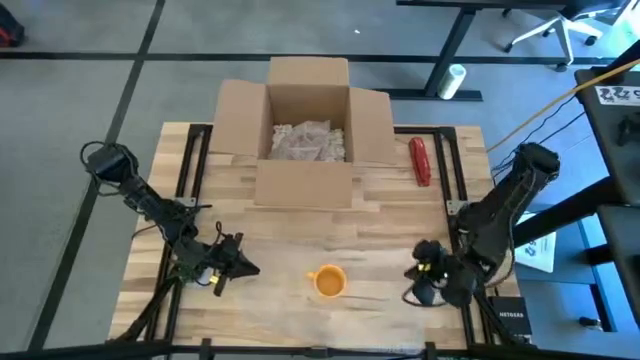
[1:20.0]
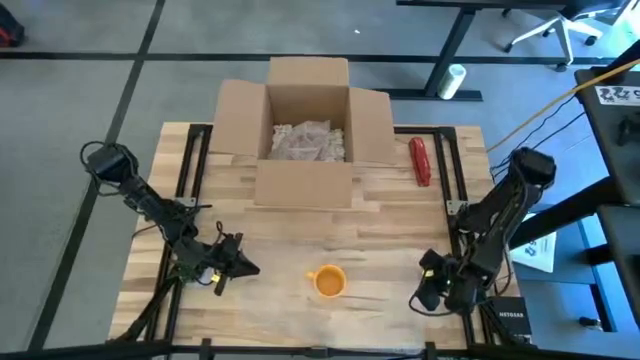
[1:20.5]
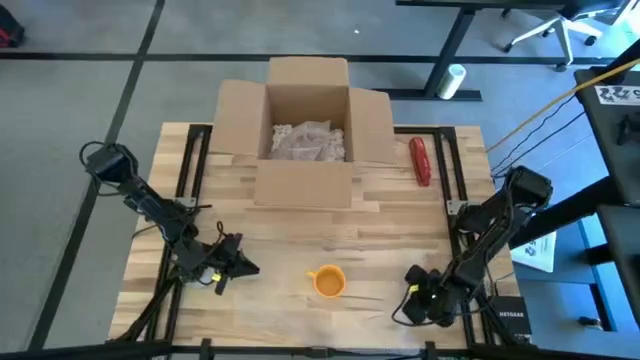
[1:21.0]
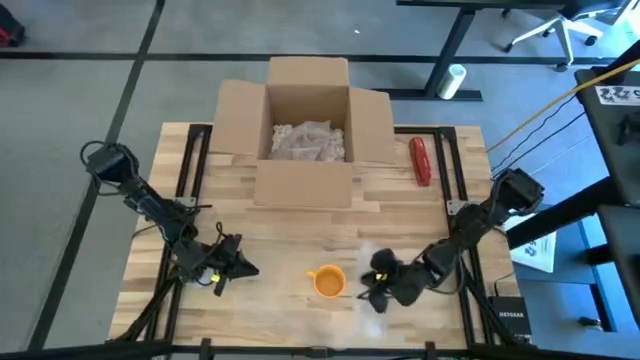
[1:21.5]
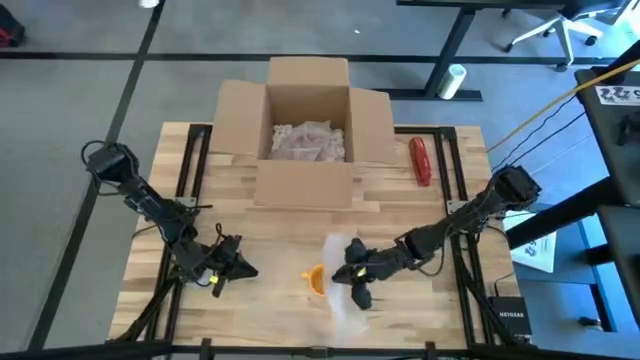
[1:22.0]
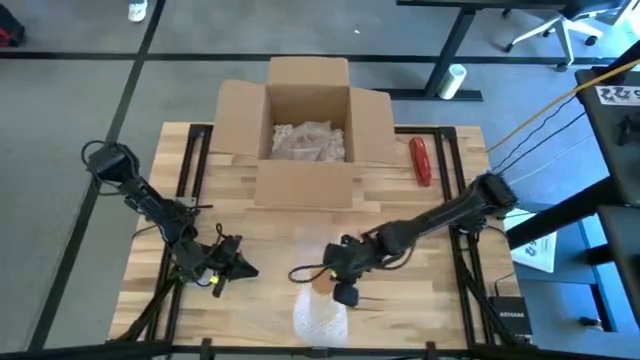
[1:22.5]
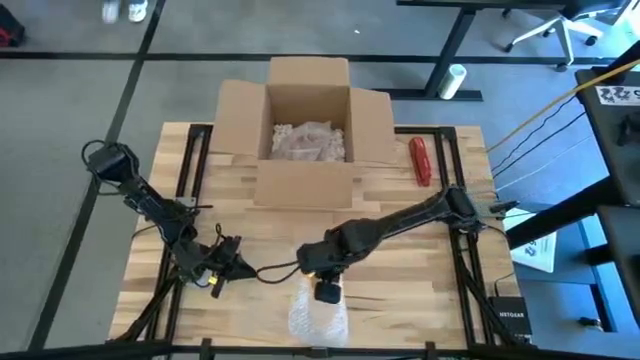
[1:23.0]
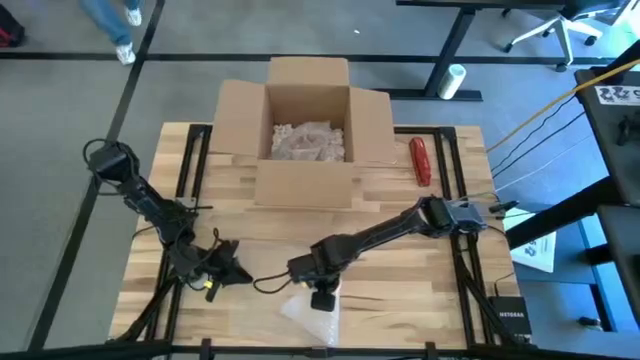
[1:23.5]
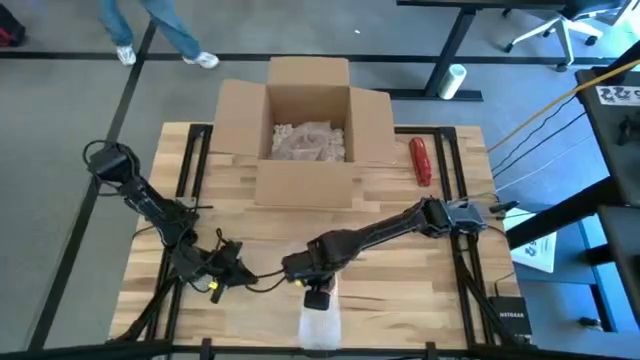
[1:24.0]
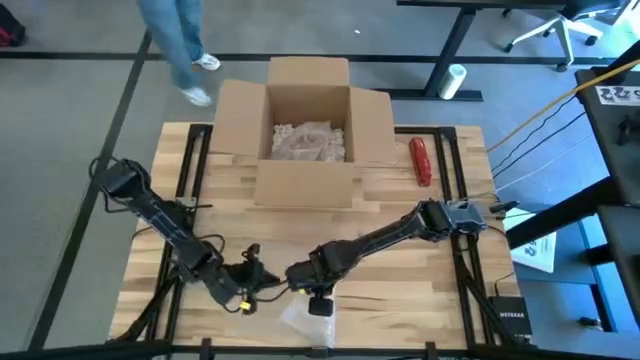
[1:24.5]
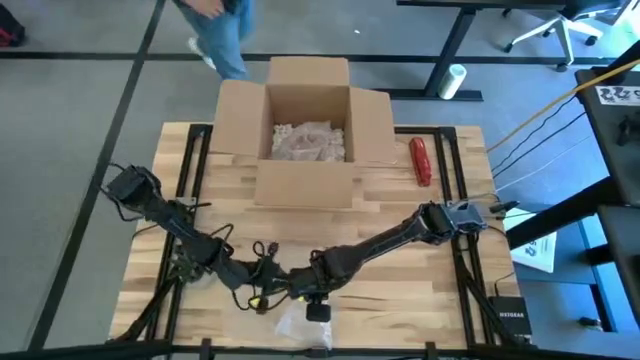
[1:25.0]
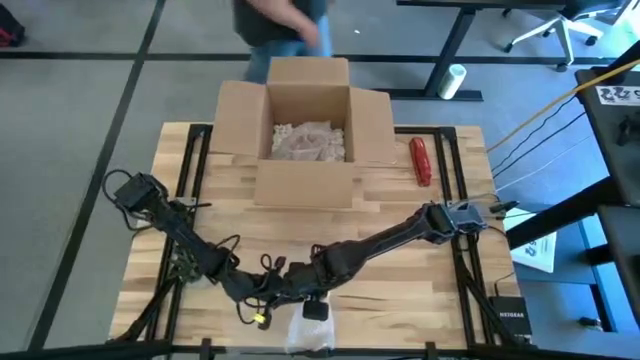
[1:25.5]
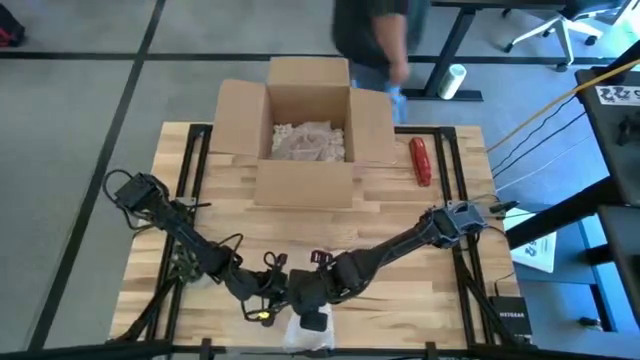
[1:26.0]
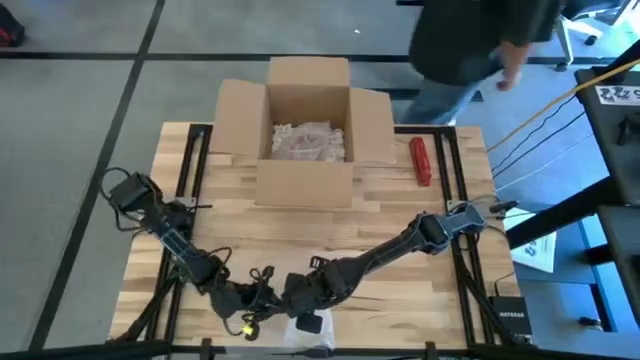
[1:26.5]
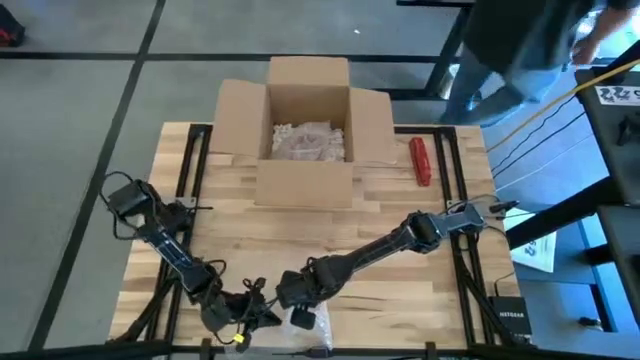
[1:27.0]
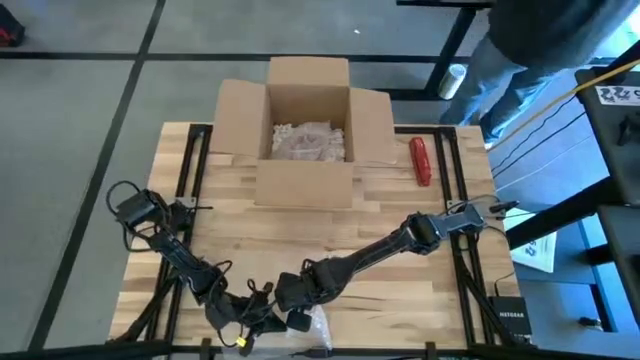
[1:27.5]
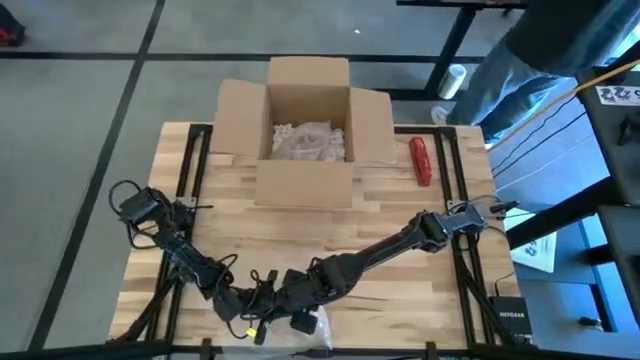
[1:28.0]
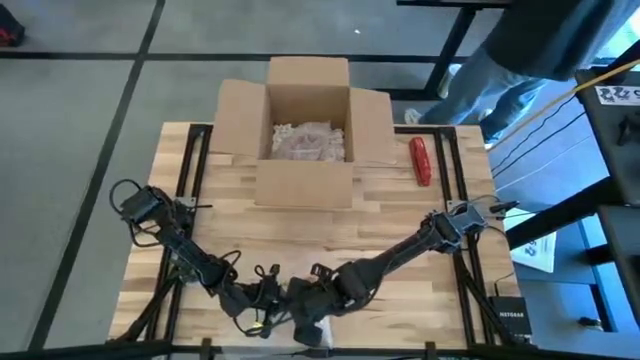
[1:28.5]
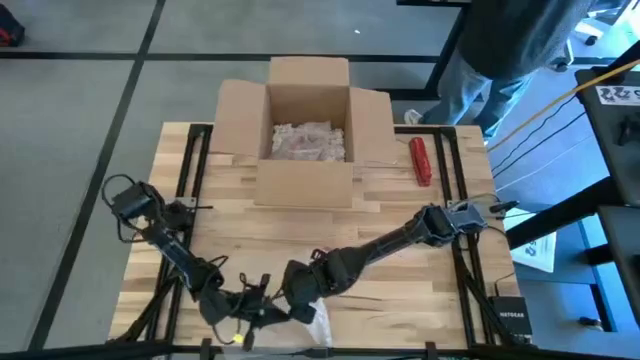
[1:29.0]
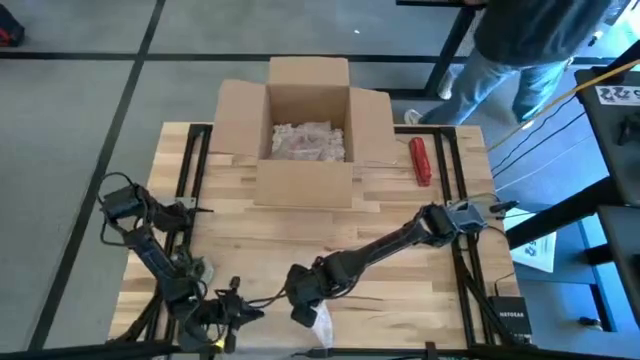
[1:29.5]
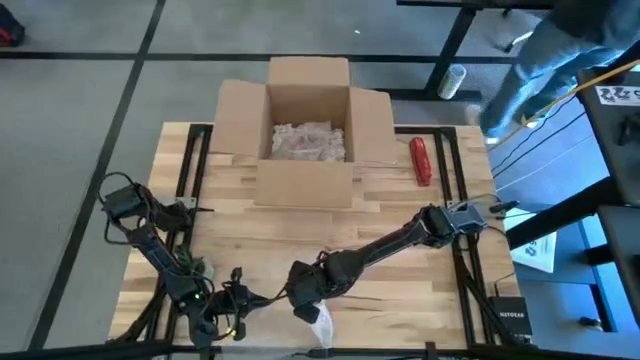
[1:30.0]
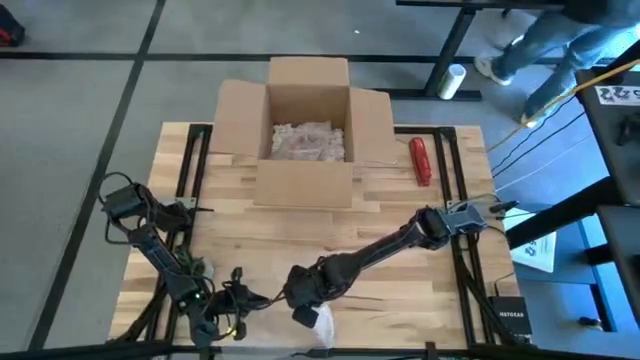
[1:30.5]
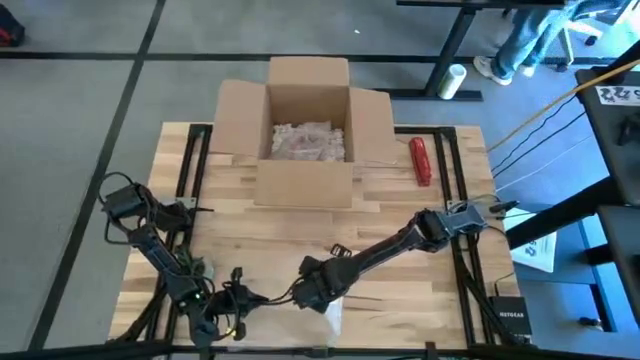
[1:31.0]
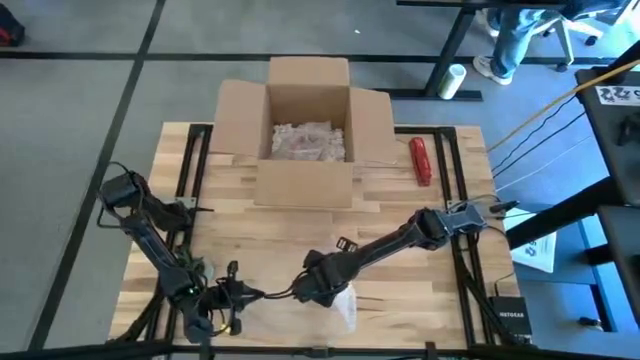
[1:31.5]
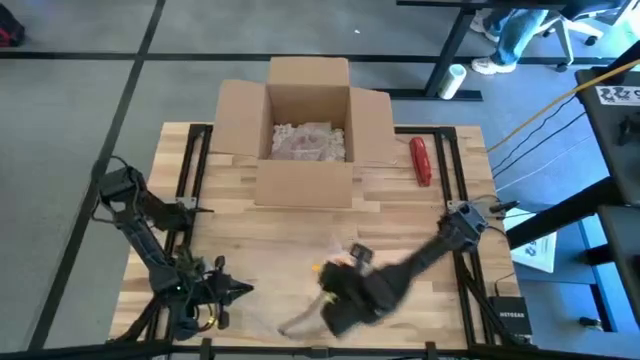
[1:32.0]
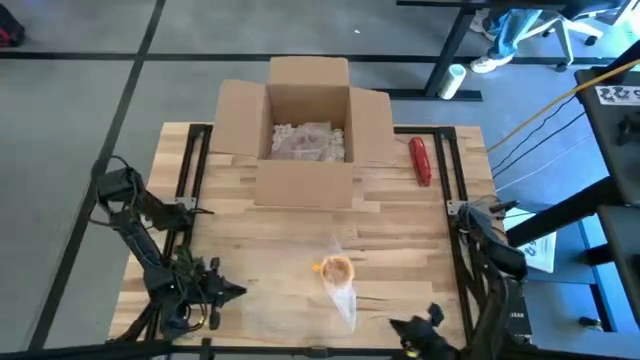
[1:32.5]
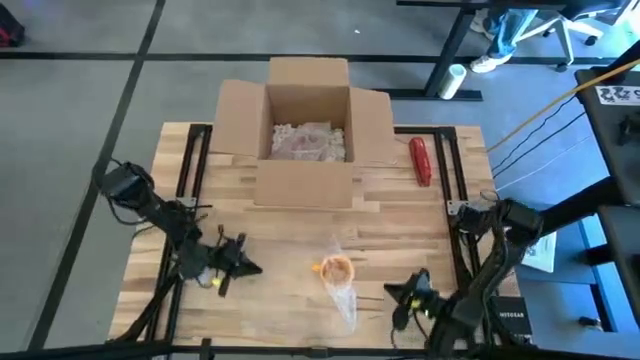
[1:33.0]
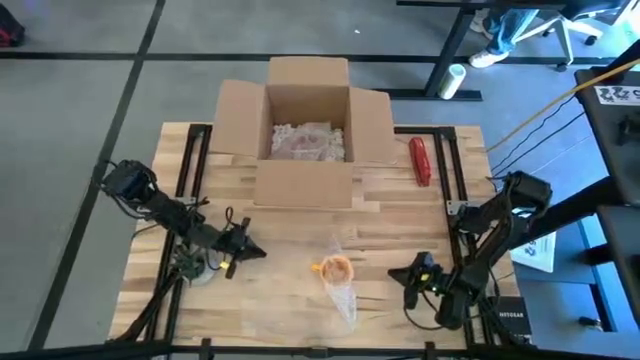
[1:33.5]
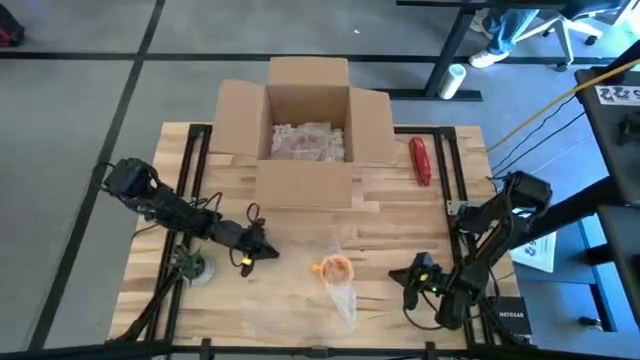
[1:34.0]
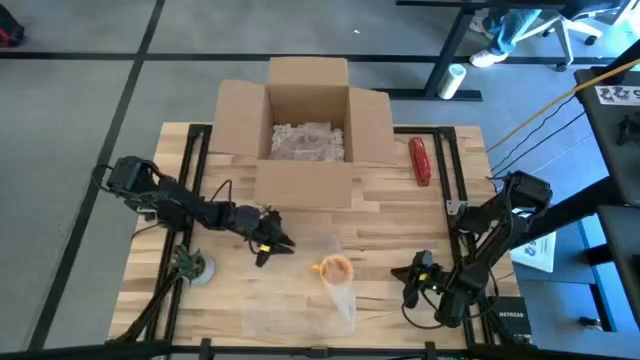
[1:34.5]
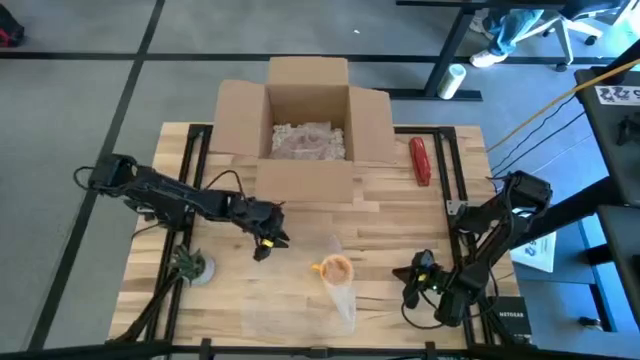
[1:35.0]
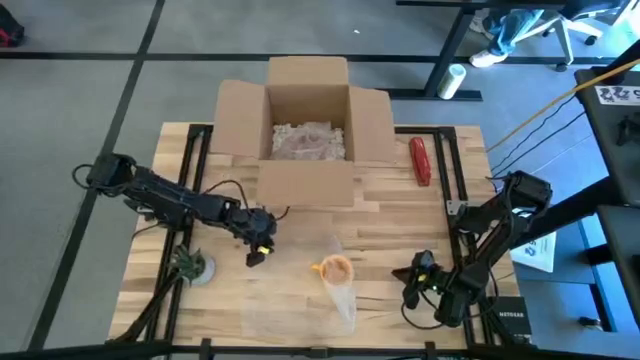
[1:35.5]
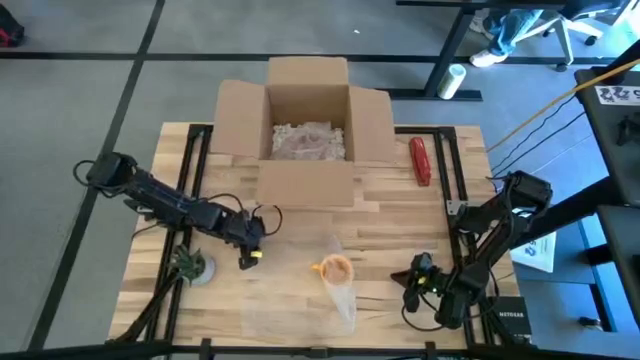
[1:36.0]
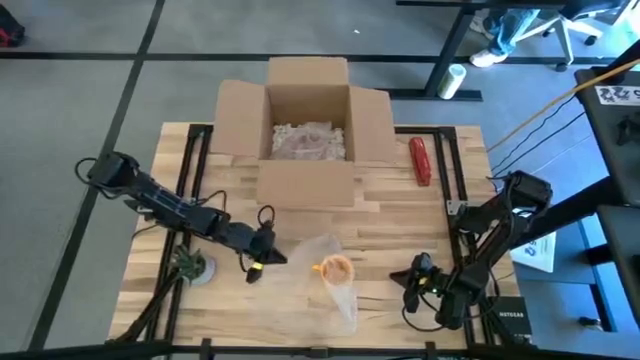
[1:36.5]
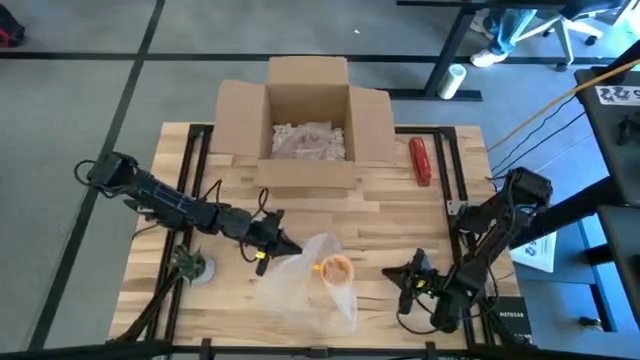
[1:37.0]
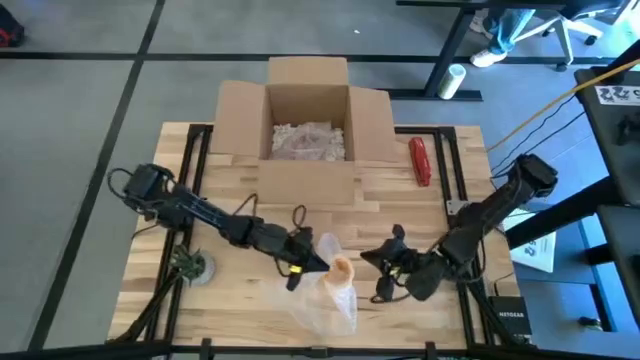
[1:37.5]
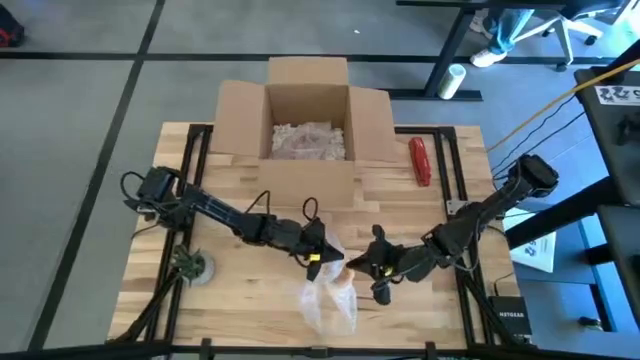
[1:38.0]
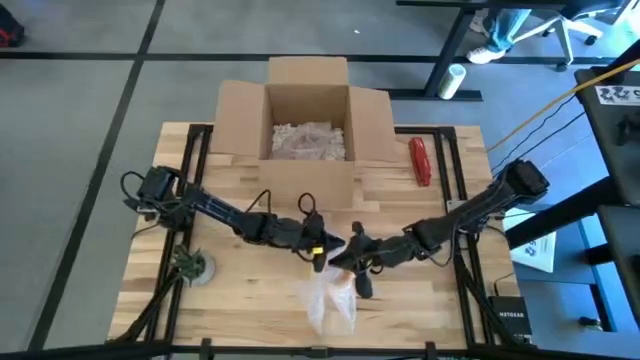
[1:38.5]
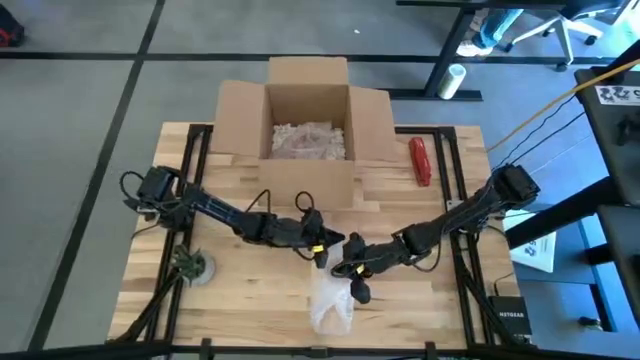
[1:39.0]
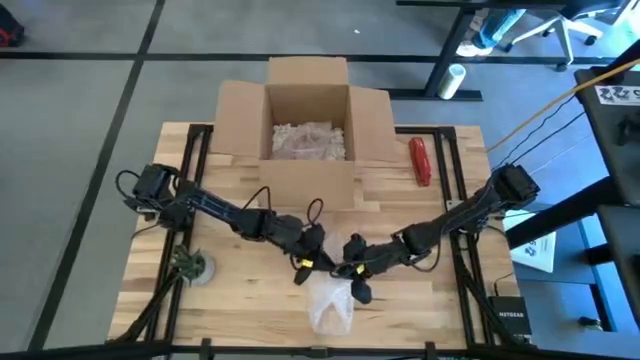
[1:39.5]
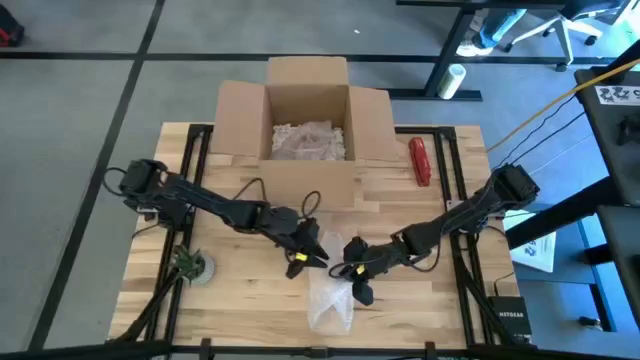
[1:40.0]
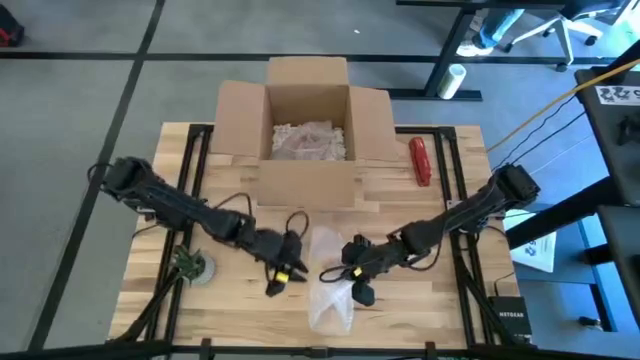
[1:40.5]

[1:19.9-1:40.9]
Task: wrap mug
Wrap the yellow mug with bubble wrap
